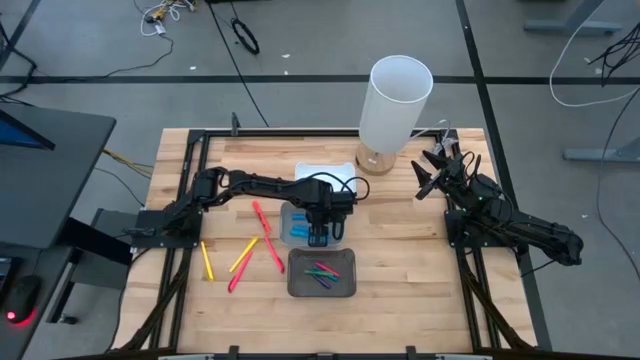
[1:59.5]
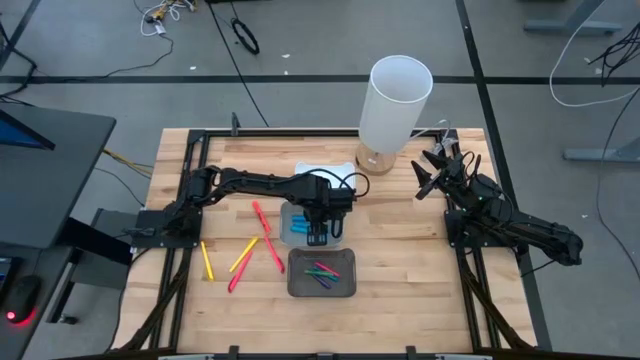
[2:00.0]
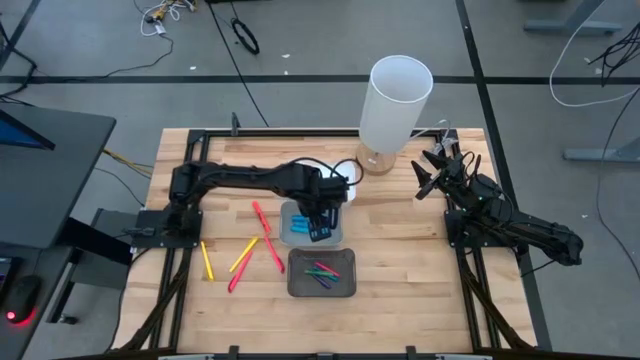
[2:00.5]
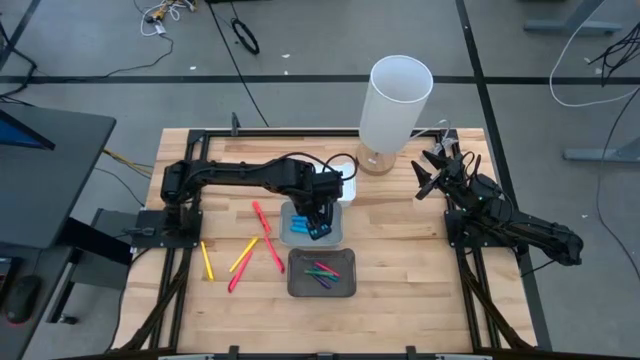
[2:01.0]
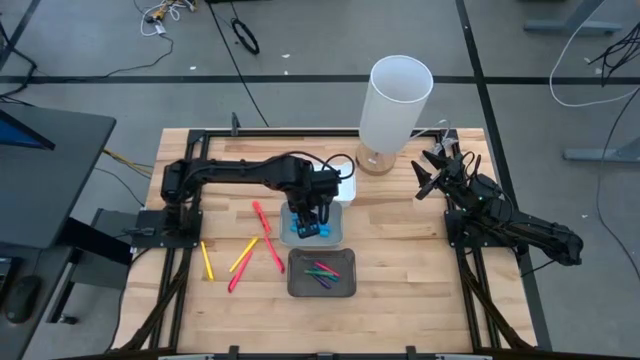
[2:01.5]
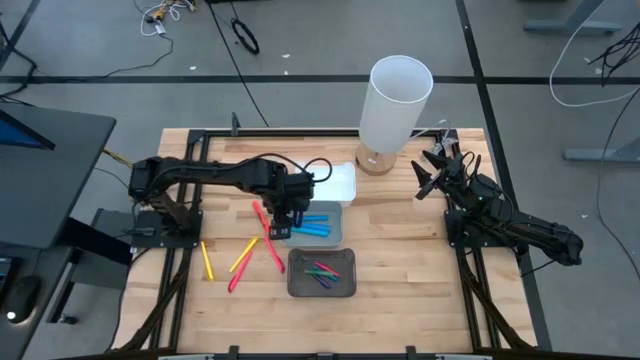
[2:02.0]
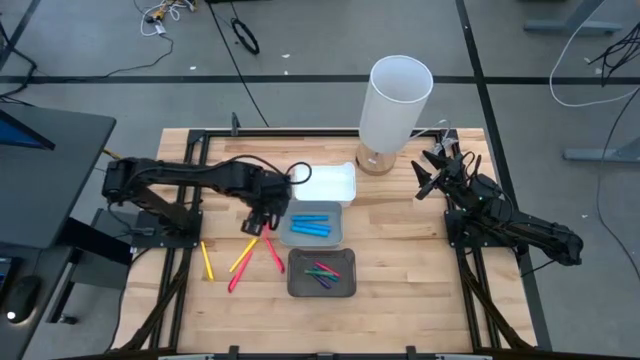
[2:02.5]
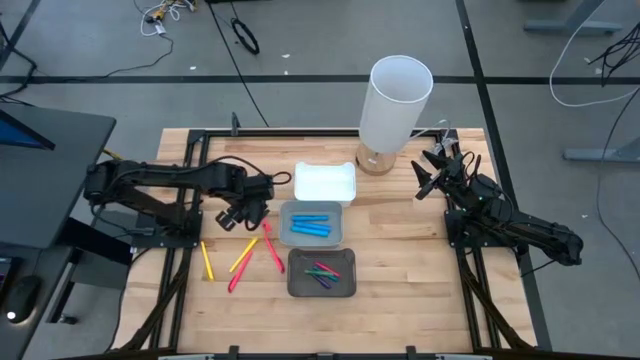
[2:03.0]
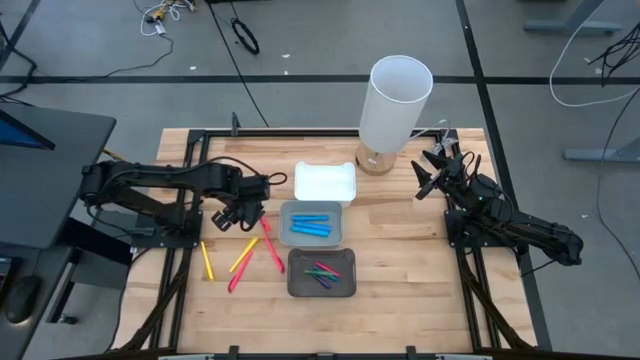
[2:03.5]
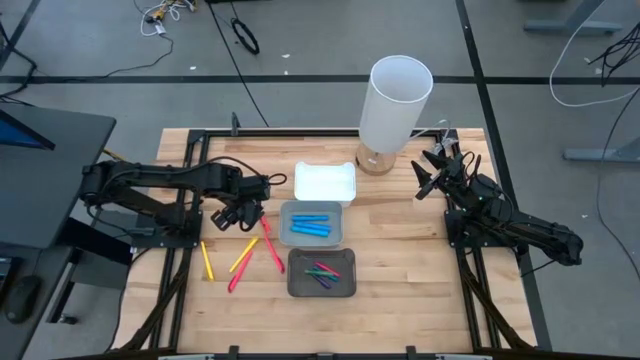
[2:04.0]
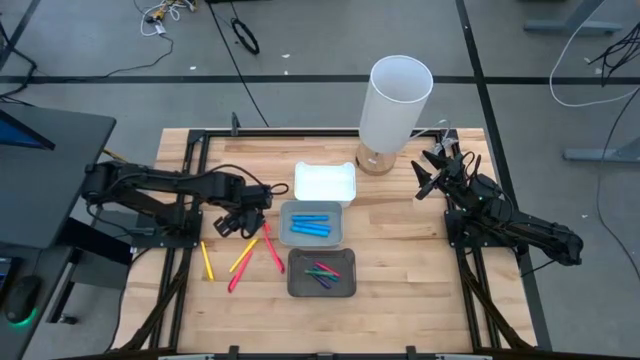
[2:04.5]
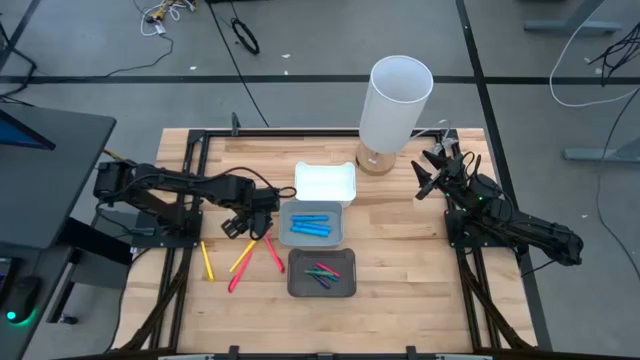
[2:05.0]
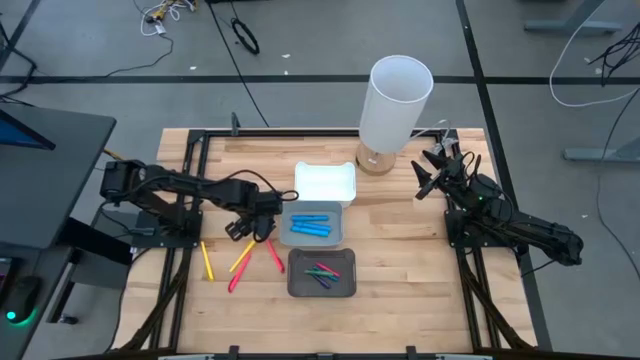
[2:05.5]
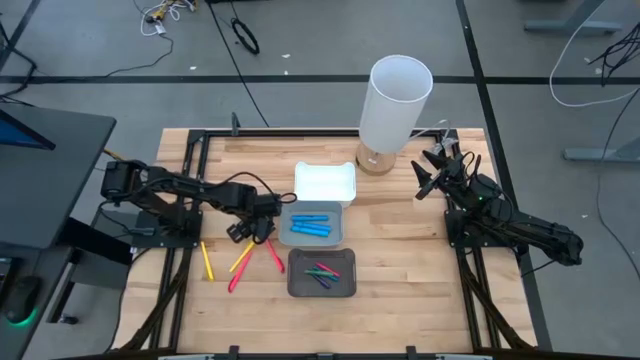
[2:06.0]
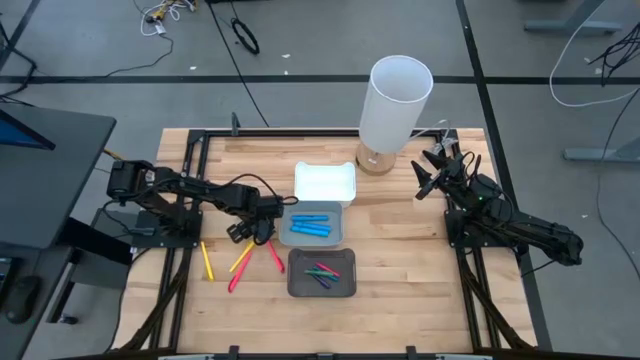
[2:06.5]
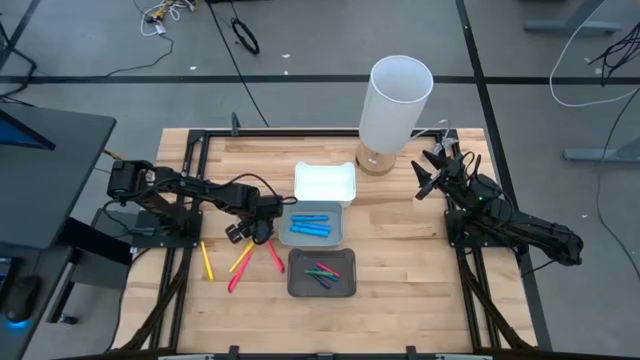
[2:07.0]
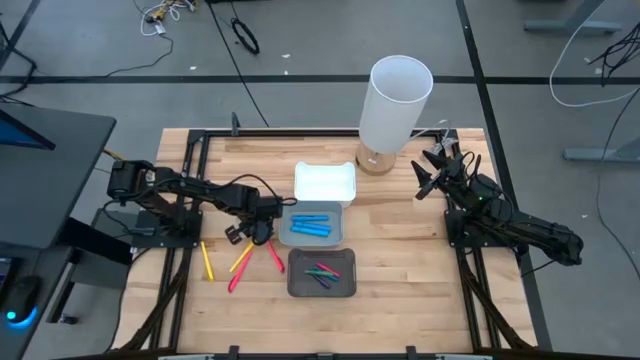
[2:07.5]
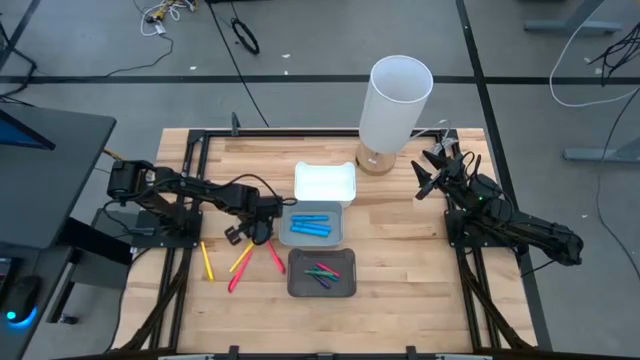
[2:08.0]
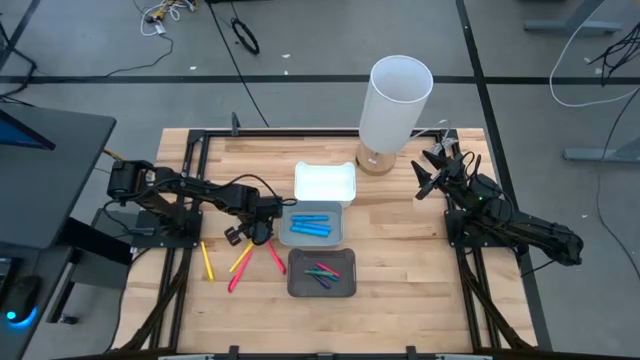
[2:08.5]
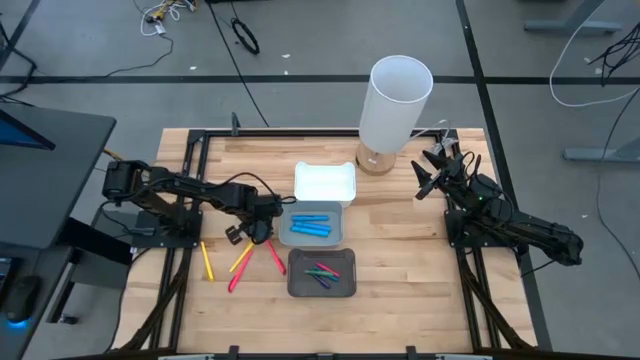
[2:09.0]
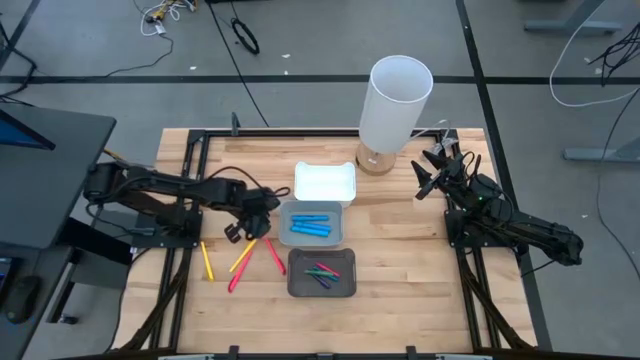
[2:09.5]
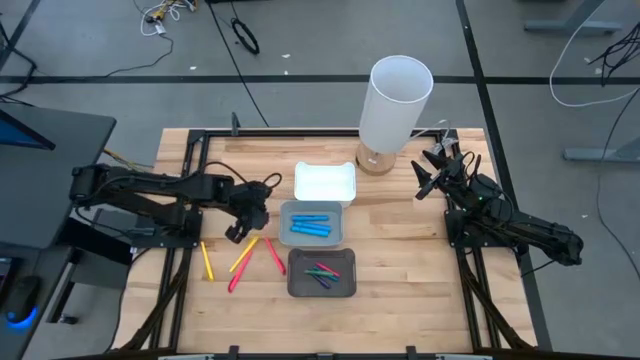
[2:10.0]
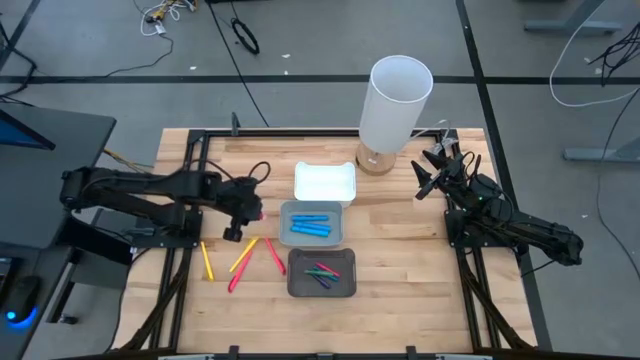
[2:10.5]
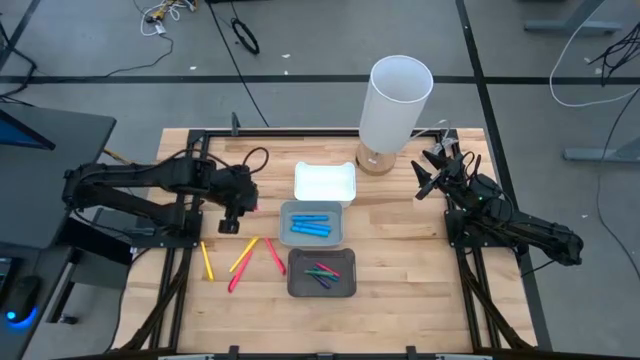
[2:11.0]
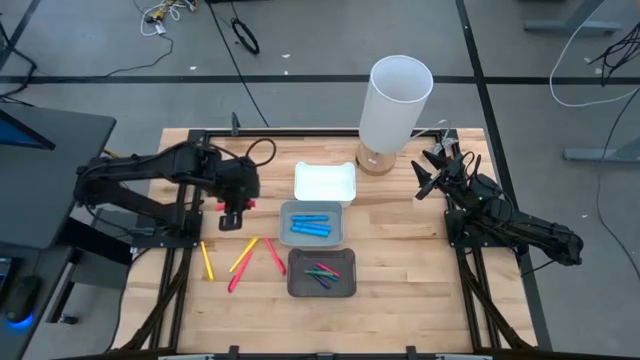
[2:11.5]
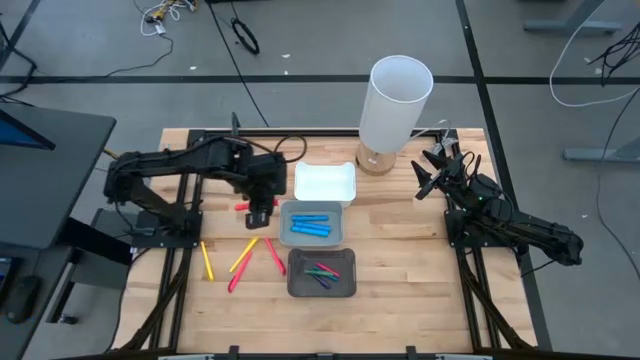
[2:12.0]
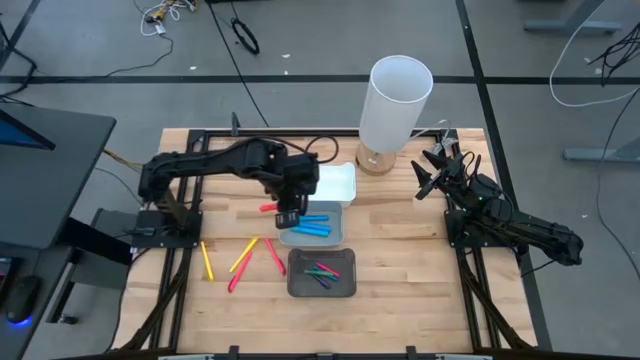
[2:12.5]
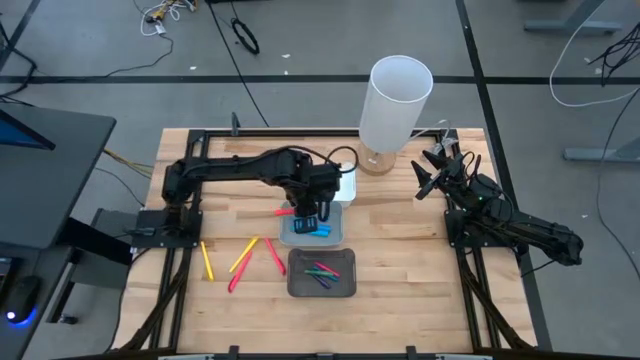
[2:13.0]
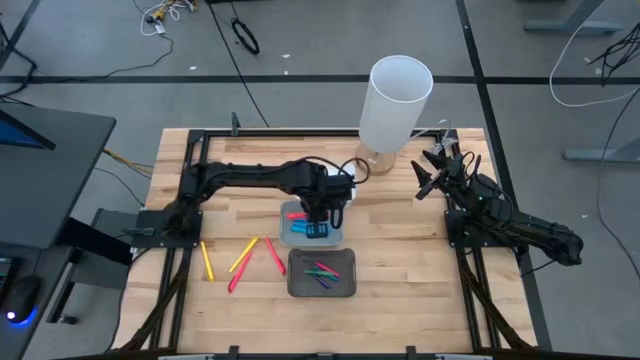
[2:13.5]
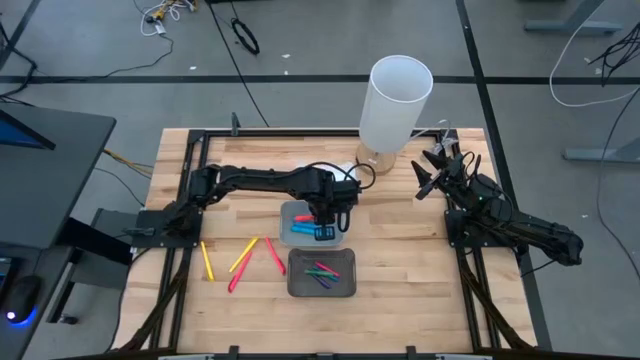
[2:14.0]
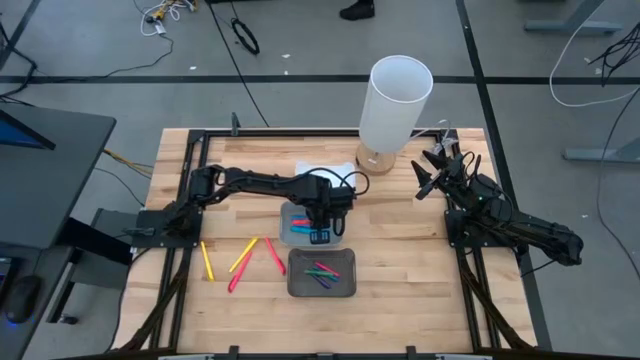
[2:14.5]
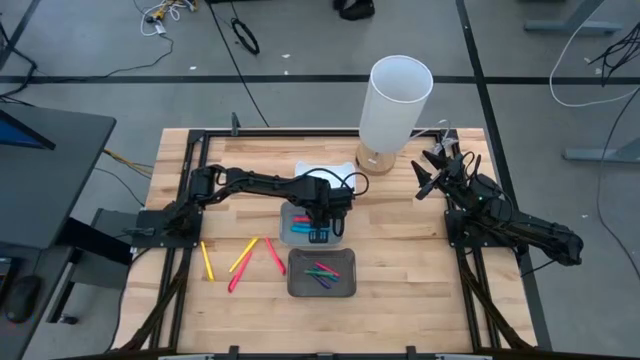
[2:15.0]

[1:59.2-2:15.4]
Task: Pick & Place Markers
Put the pink highlighter pen into the gray bin

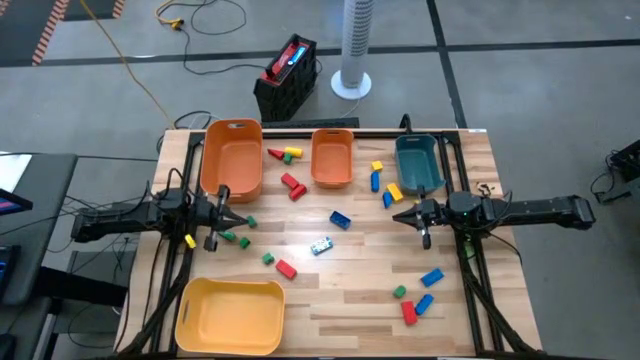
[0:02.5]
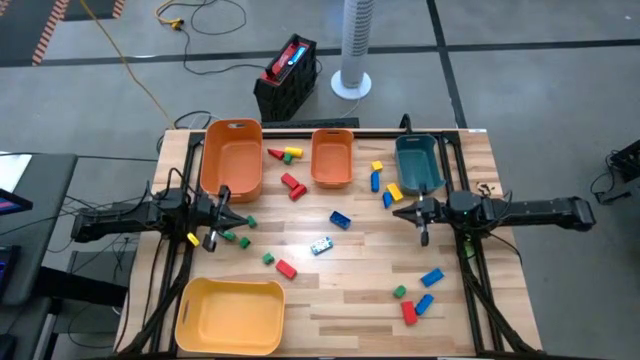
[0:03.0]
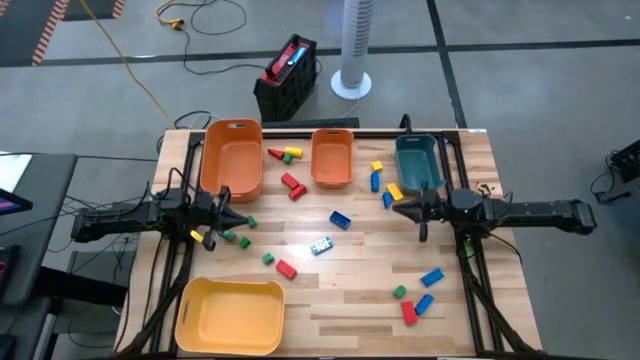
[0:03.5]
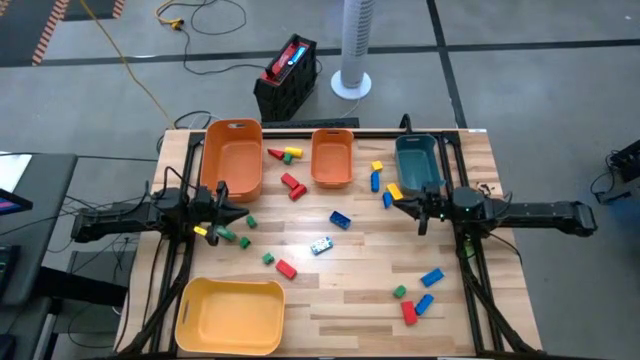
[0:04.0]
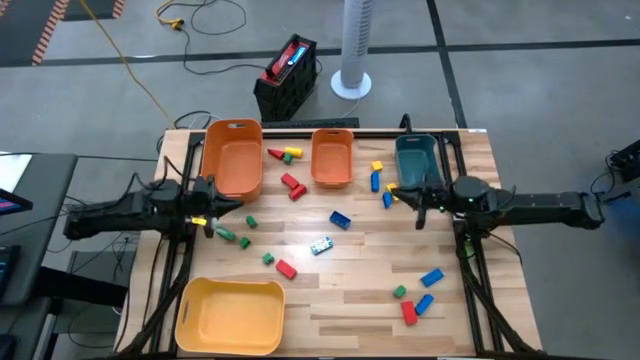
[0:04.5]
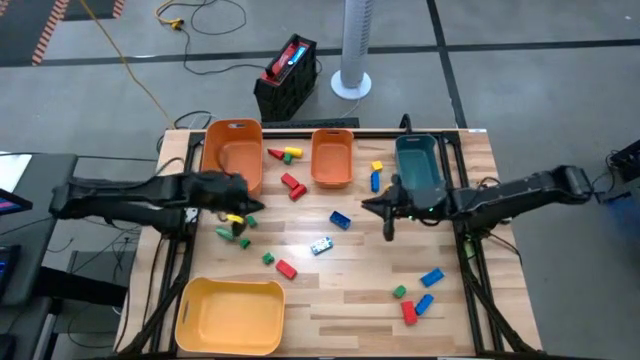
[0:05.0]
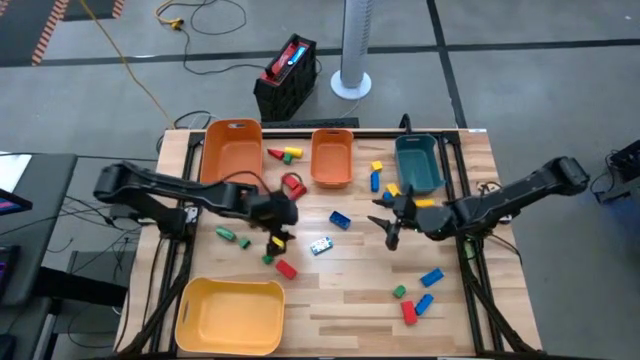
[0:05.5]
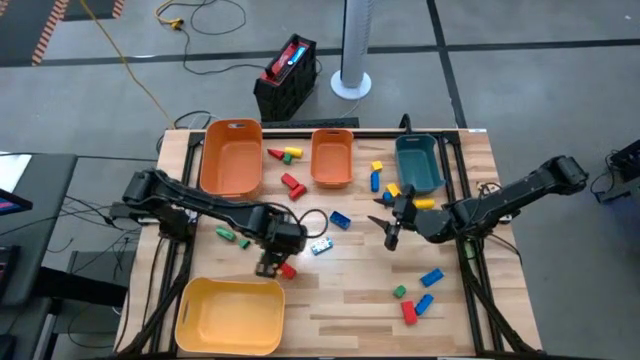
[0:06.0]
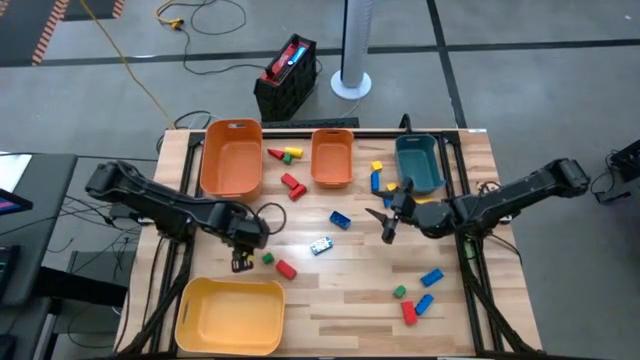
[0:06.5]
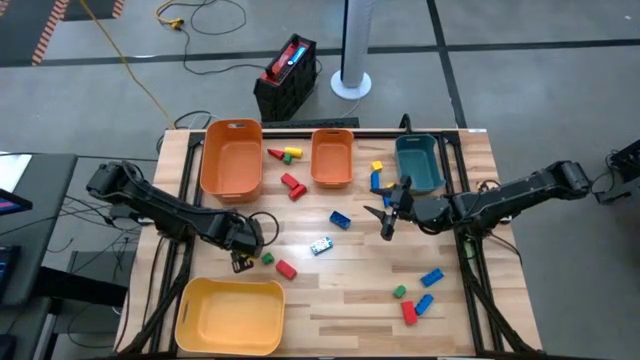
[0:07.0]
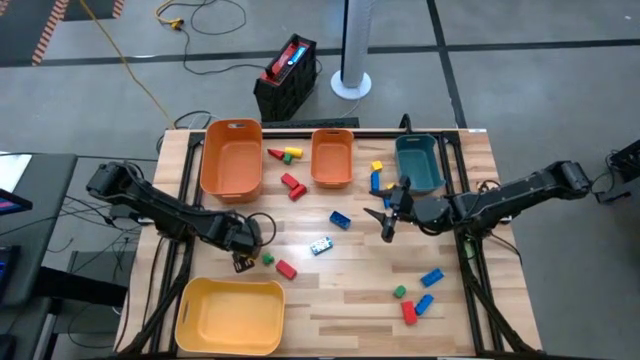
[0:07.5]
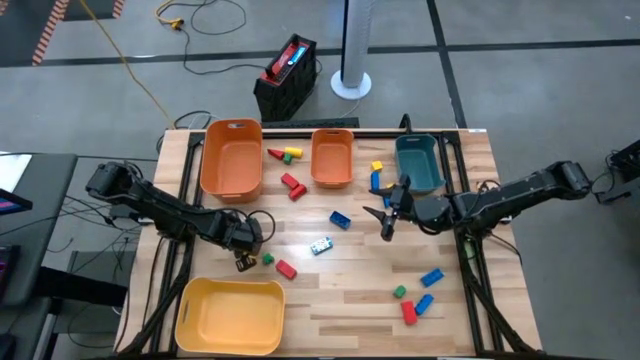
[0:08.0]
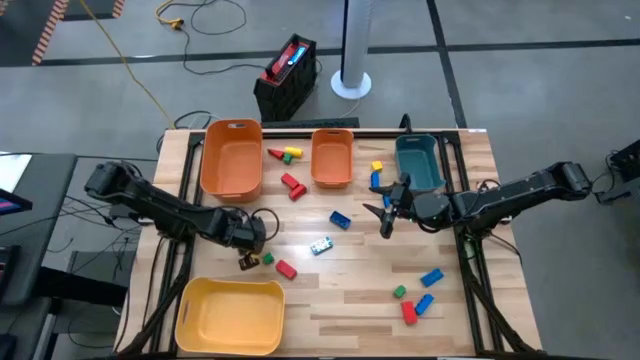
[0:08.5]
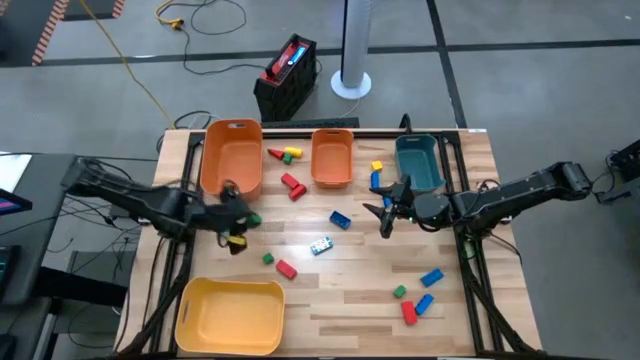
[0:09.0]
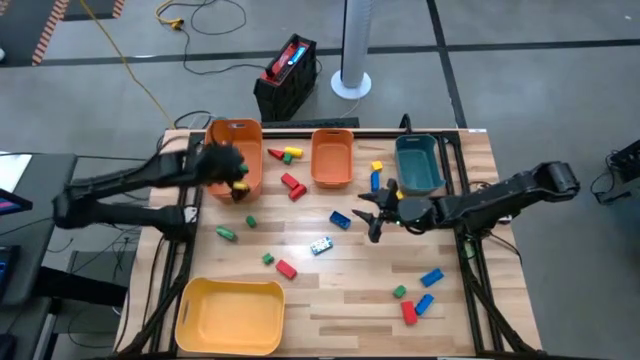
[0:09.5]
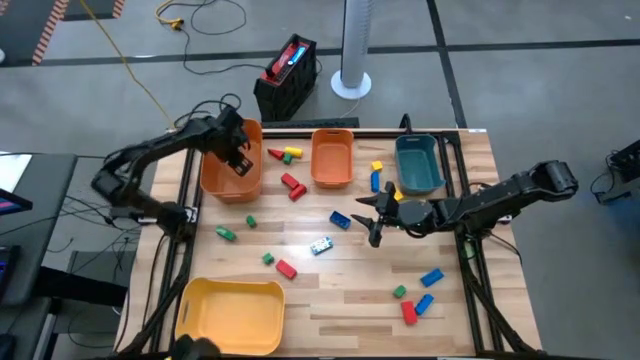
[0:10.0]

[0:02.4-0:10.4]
Task: Sort blocks
Put the green game piece into the left orange bin
